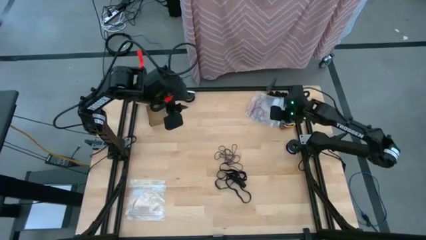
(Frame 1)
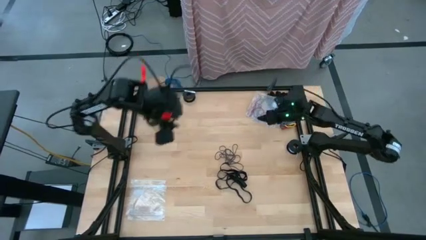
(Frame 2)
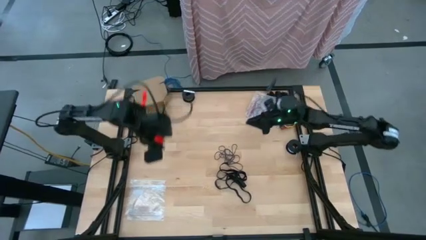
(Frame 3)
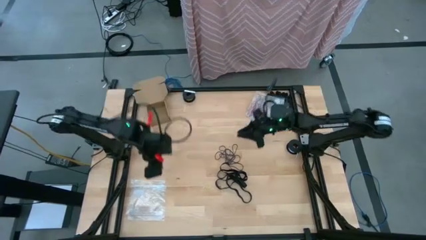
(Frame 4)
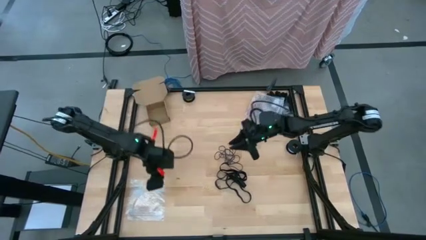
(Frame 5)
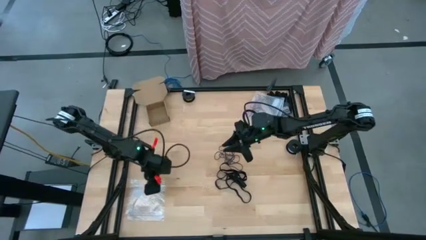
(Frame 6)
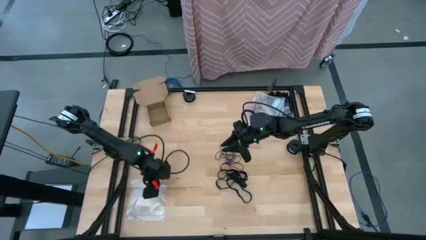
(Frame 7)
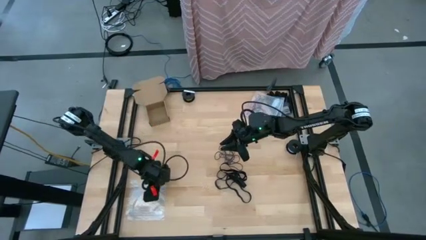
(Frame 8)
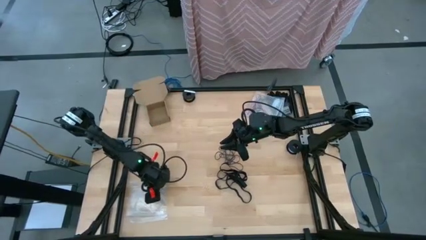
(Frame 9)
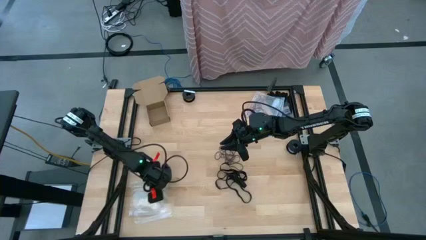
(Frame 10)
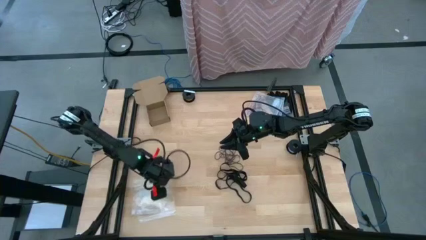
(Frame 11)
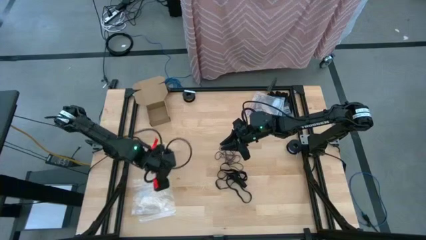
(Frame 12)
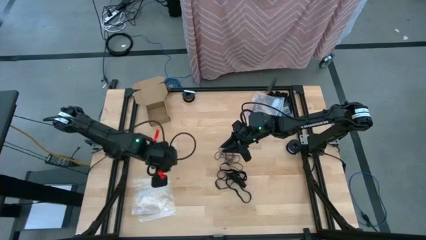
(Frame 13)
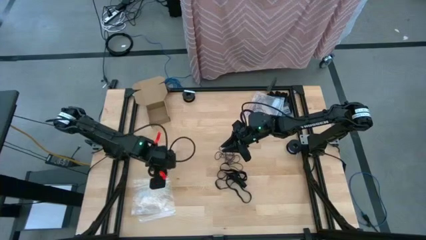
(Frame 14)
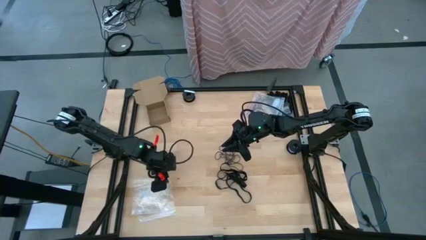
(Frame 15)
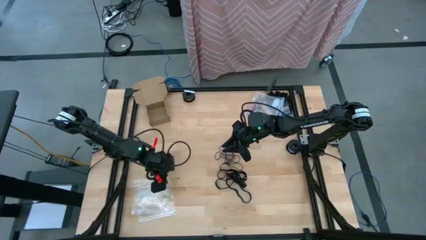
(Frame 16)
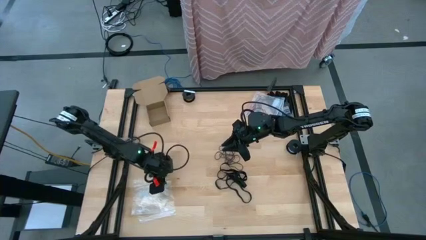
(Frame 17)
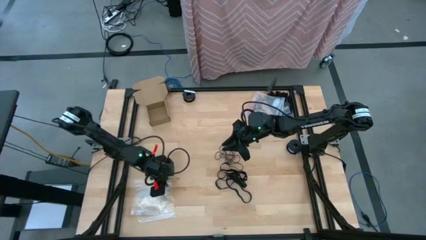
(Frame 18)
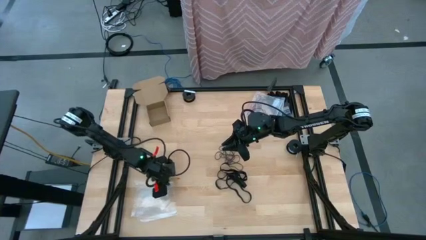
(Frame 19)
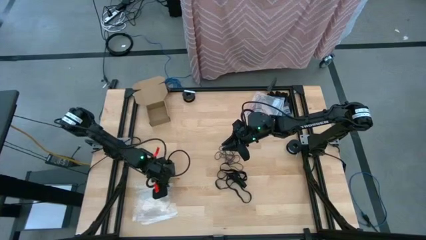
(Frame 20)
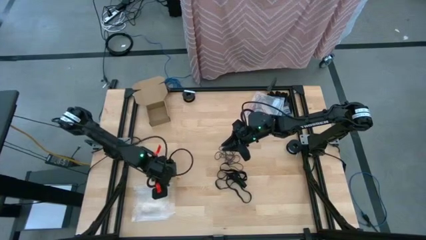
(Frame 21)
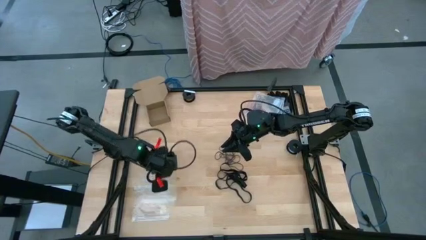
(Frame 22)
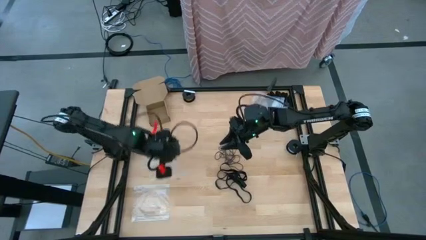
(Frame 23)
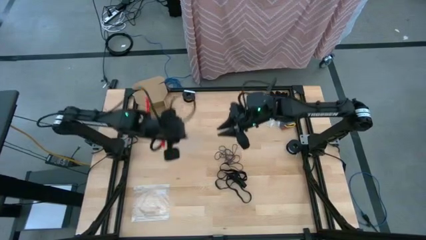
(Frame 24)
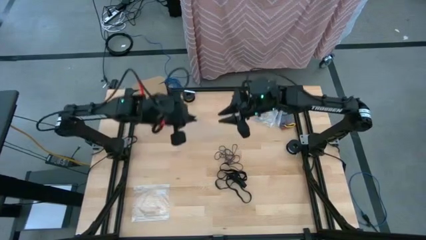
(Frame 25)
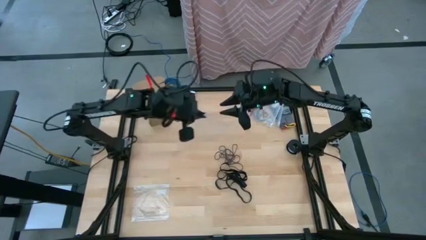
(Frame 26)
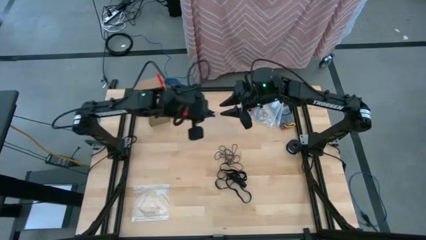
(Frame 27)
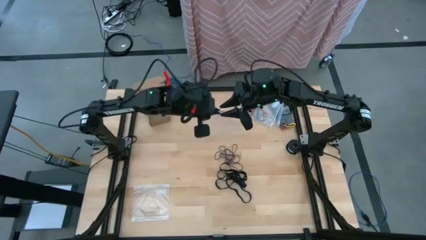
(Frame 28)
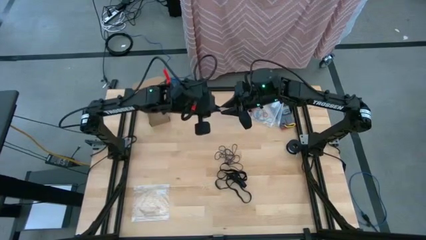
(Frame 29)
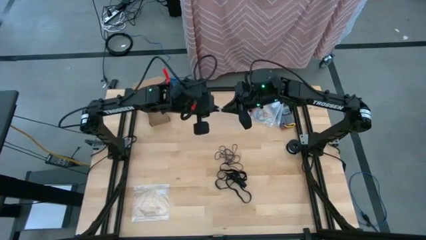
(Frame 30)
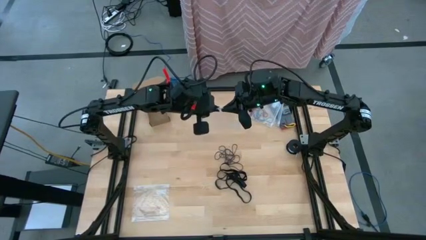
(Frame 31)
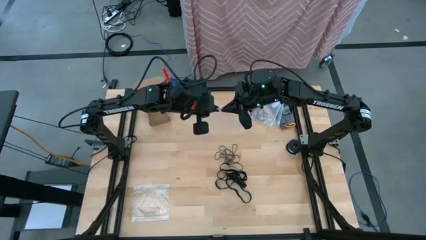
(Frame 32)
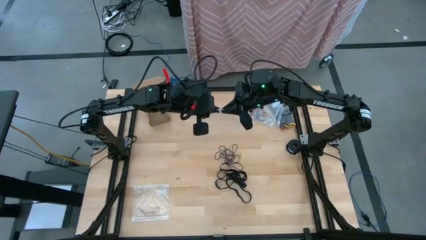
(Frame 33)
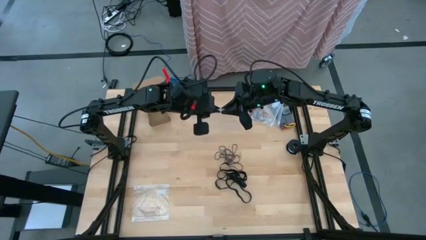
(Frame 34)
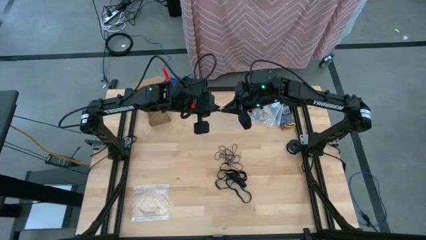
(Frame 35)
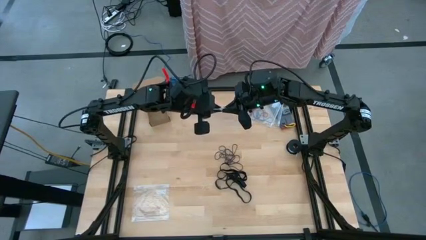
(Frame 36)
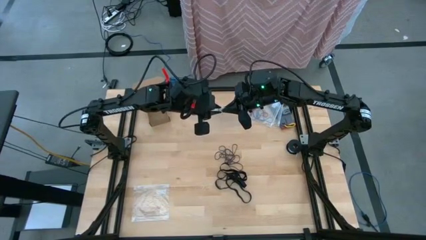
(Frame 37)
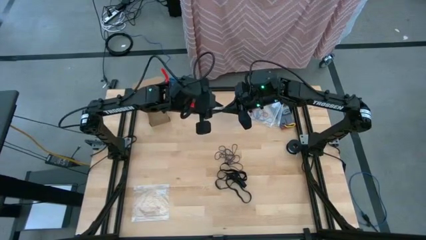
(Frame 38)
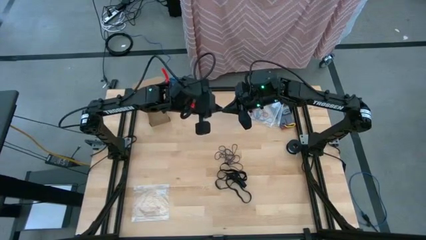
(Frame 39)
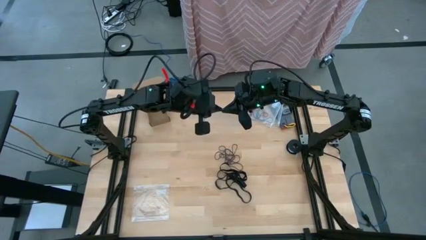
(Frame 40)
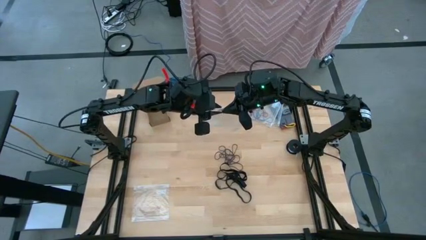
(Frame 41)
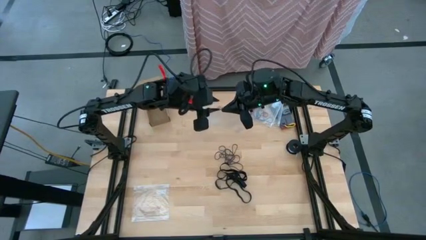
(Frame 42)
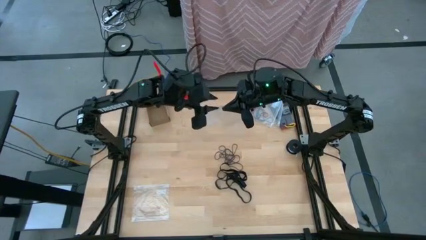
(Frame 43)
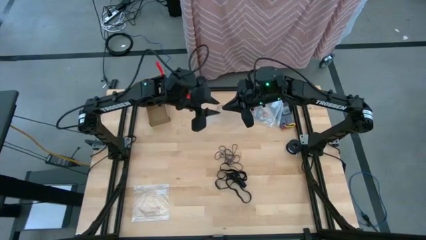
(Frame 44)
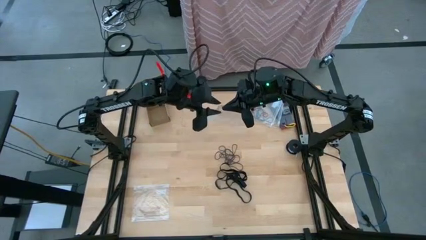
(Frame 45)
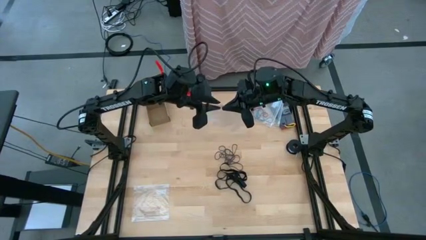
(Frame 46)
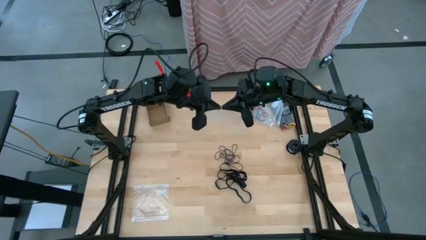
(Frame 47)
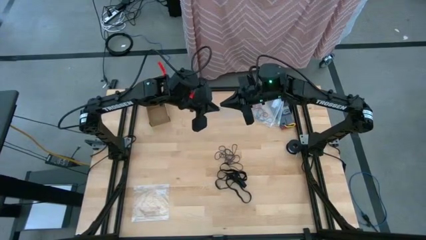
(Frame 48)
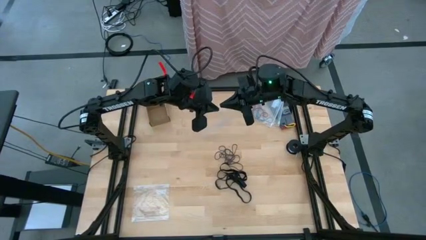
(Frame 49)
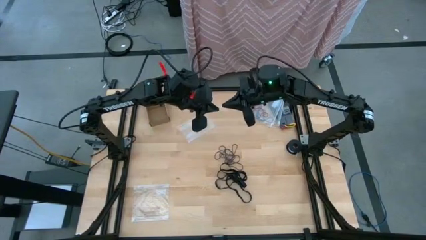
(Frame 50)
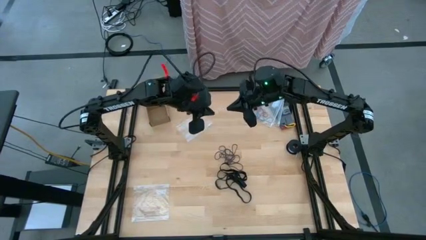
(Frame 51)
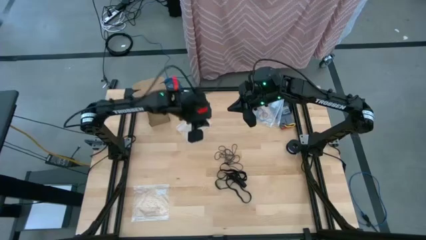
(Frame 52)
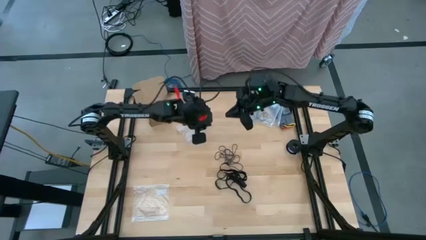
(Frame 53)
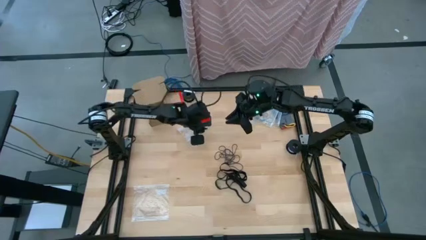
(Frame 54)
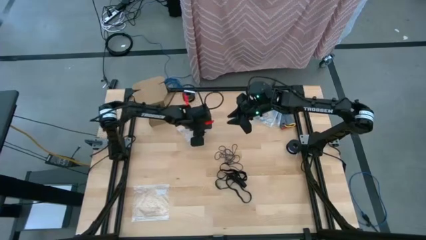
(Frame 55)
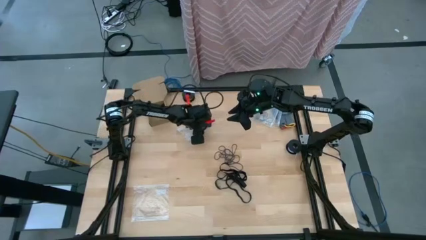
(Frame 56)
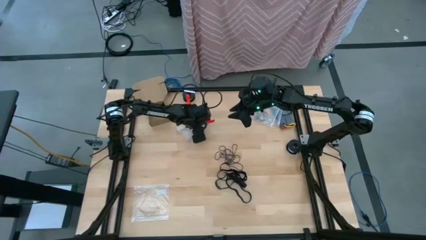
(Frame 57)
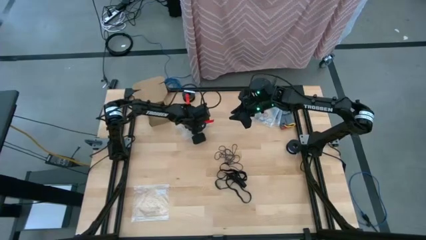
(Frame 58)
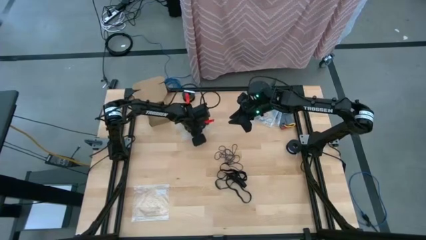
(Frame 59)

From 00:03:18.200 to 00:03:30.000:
Task: Sort rubber bands
Open the transparent zip bag

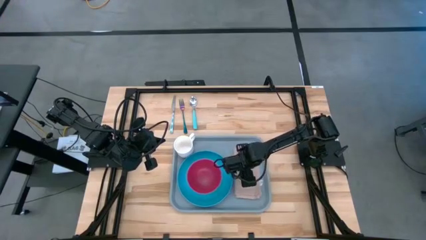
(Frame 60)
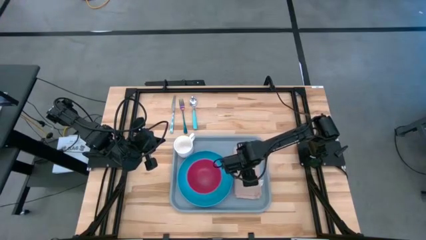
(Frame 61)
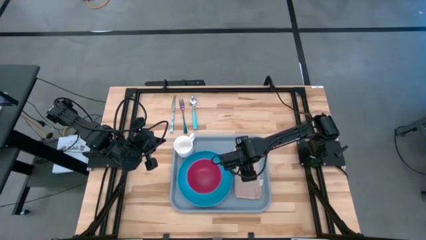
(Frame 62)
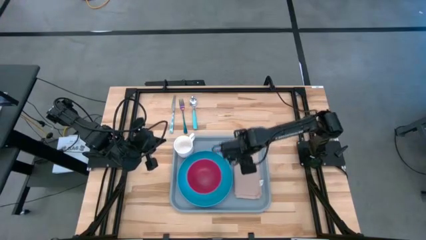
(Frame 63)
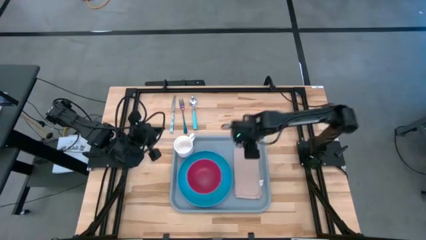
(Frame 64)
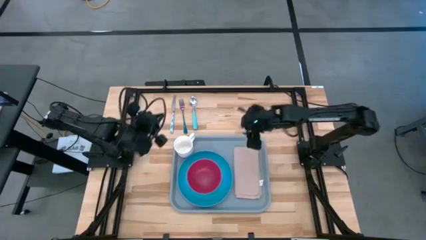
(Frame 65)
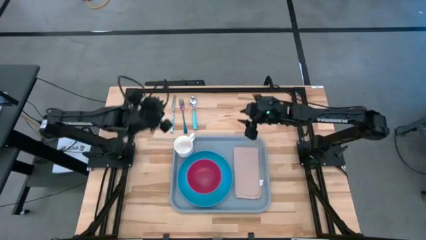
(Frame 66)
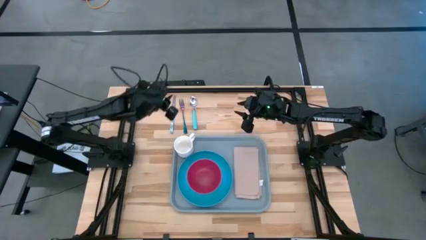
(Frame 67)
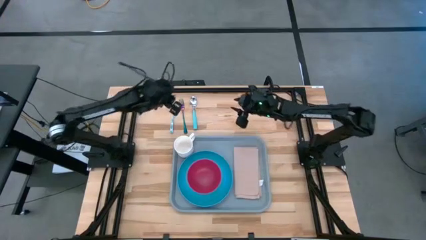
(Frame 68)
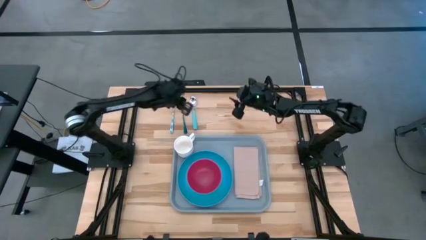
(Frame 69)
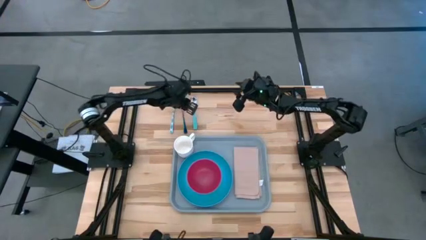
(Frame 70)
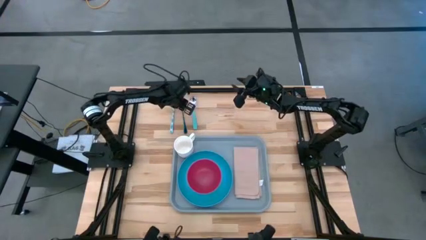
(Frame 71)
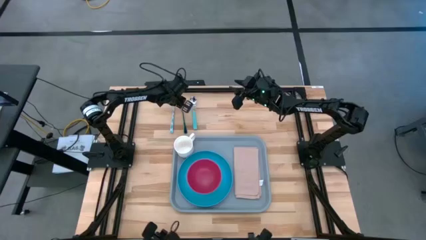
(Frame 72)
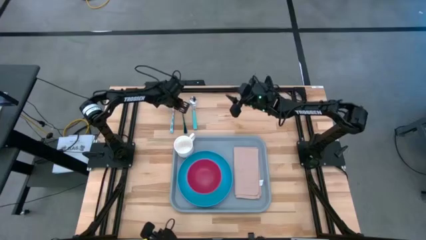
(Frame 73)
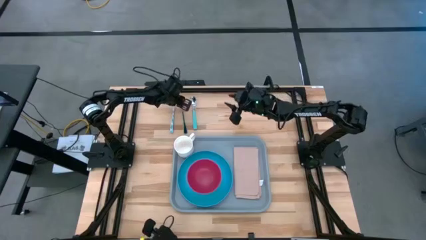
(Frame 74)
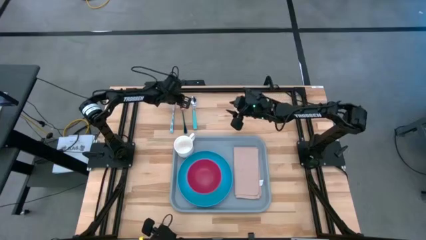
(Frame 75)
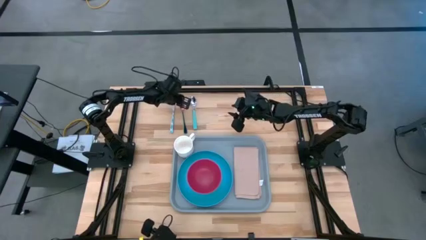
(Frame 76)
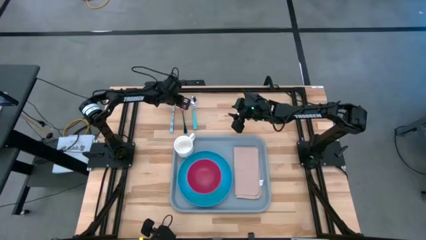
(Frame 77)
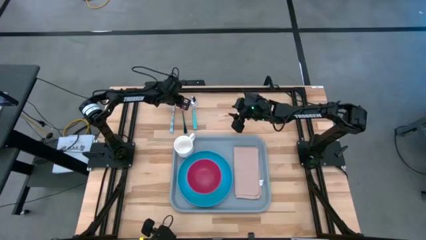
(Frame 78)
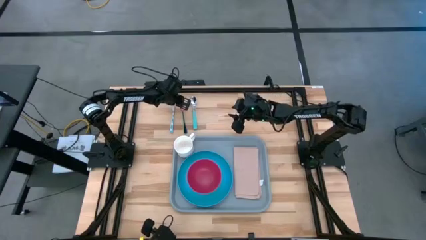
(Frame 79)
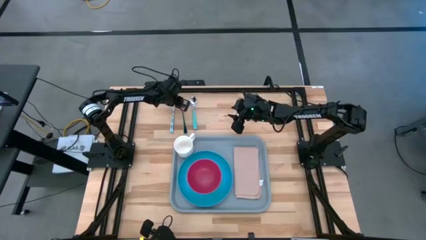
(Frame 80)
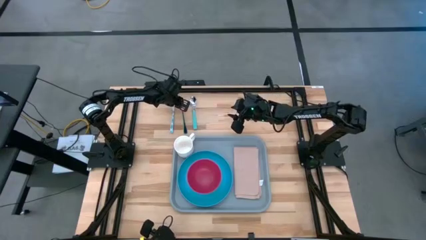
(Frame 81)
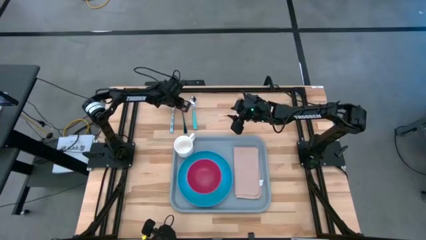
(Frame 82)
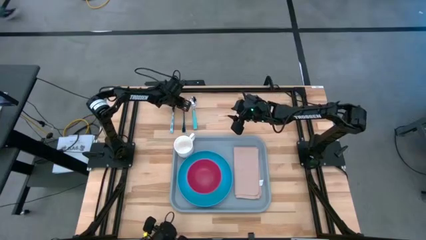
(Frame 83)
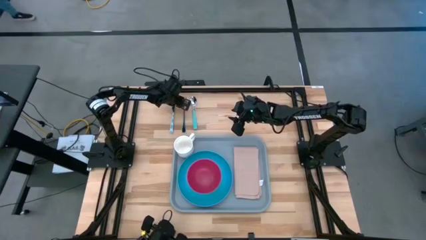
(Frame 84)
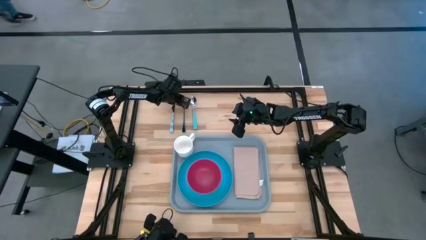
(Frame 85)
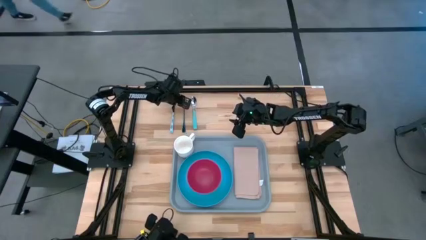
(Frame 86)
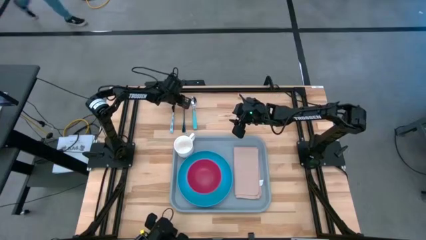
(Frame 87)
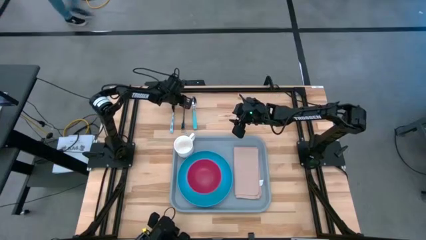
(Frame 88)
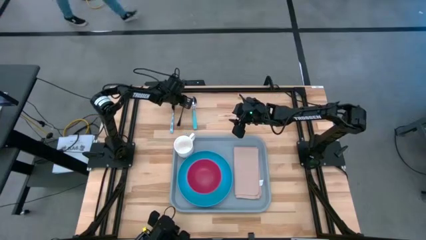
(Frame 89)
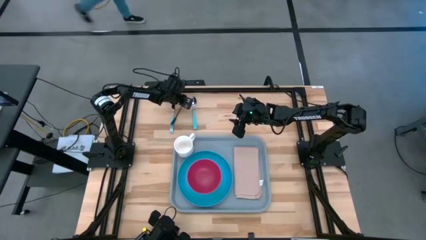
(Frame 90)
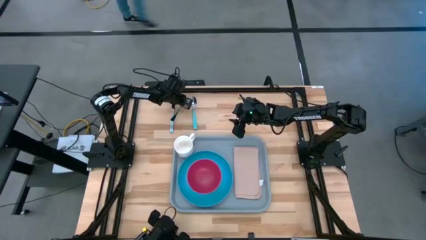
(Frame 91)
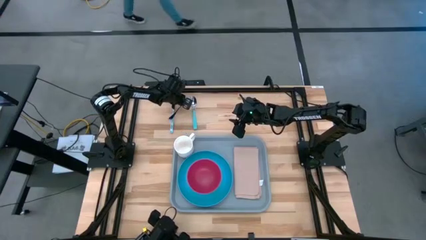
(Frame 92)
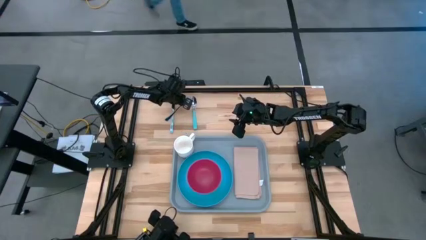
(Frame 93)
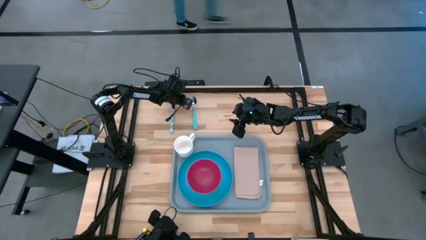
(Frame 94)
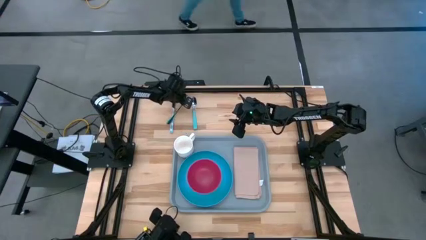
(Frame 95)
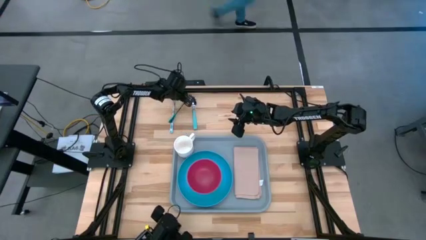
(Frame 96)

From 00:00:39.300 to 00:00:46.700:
Task: Set up tray
Put the purple fork on the gray napkin
